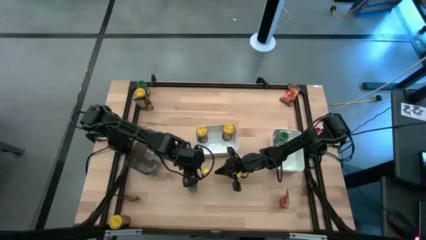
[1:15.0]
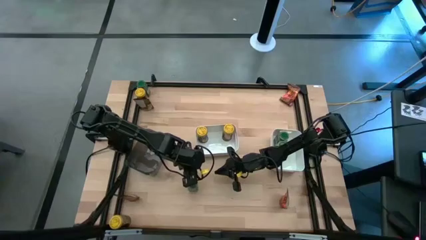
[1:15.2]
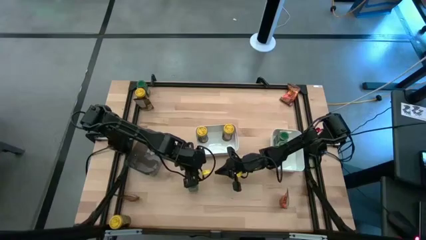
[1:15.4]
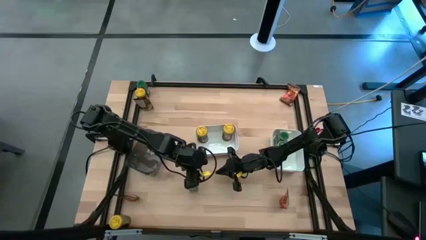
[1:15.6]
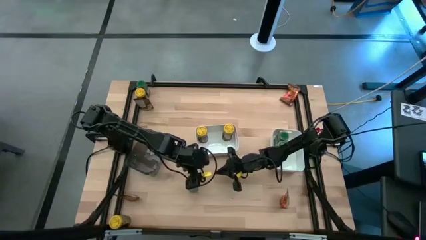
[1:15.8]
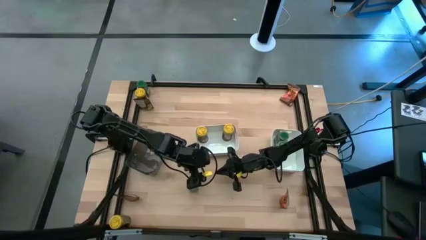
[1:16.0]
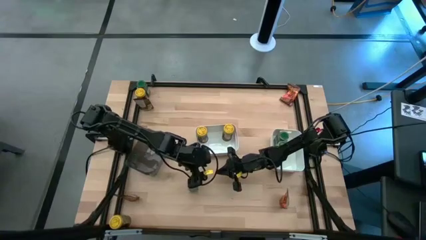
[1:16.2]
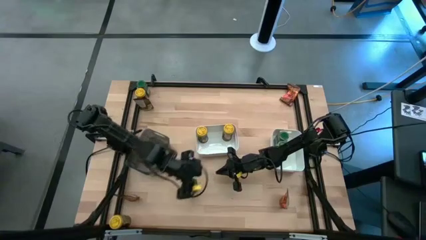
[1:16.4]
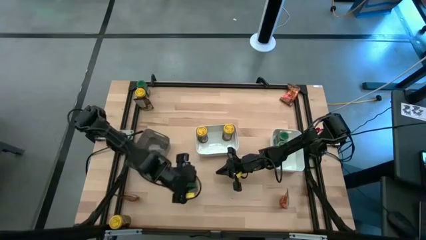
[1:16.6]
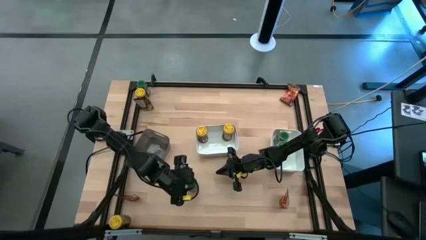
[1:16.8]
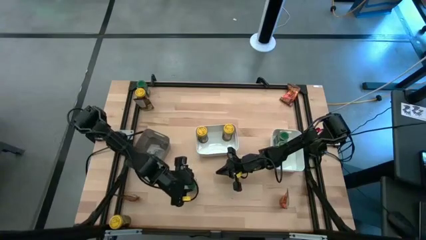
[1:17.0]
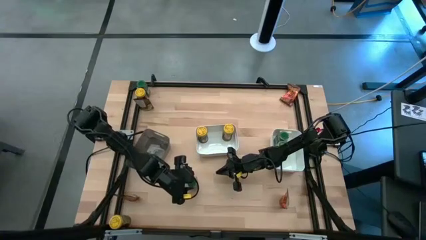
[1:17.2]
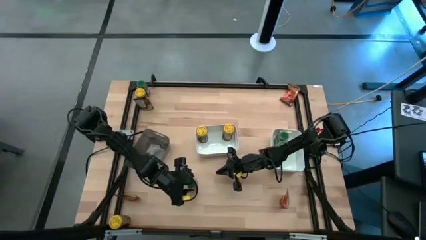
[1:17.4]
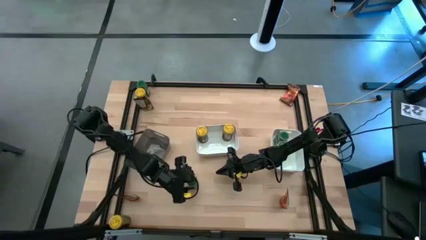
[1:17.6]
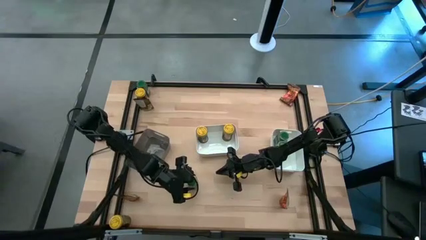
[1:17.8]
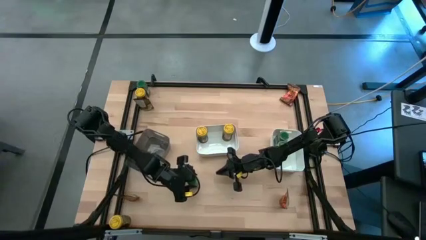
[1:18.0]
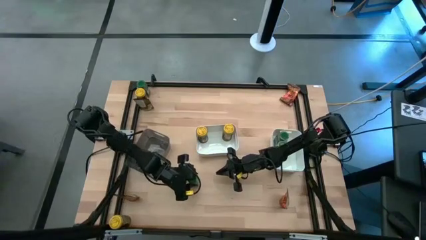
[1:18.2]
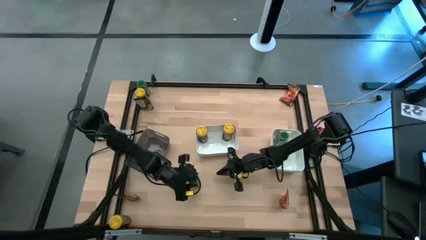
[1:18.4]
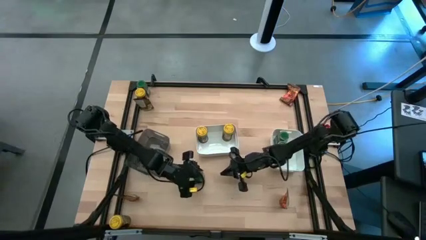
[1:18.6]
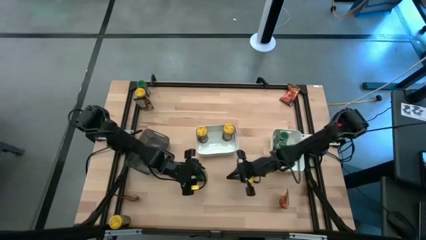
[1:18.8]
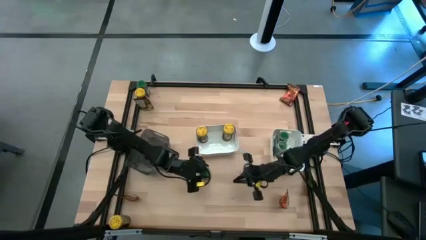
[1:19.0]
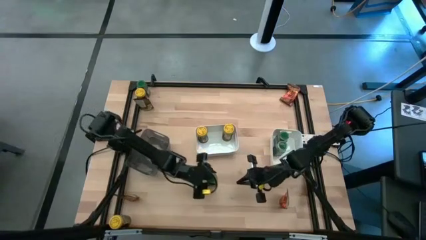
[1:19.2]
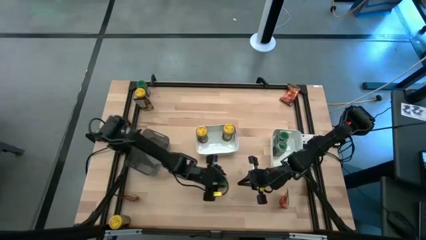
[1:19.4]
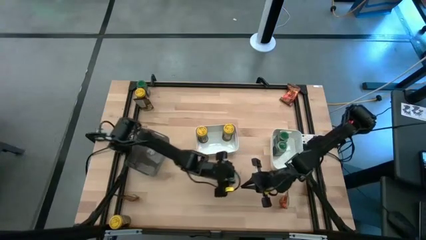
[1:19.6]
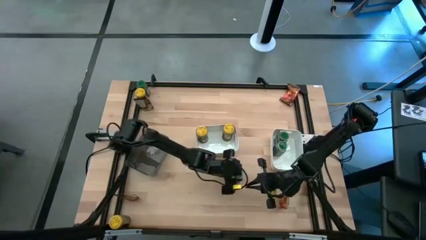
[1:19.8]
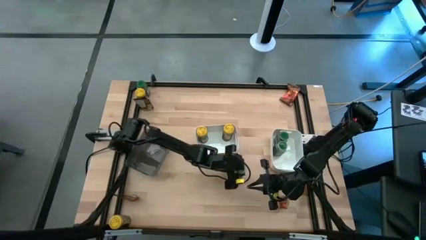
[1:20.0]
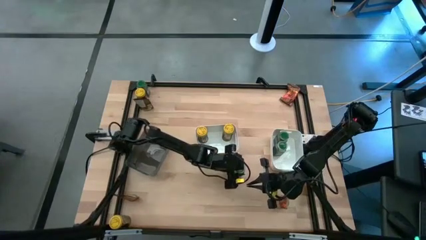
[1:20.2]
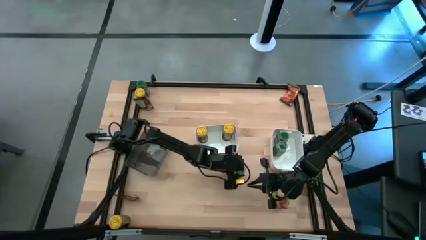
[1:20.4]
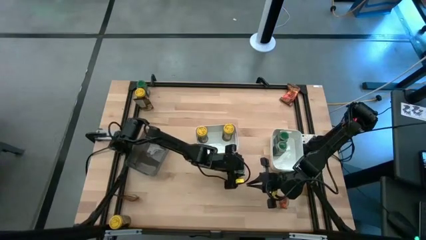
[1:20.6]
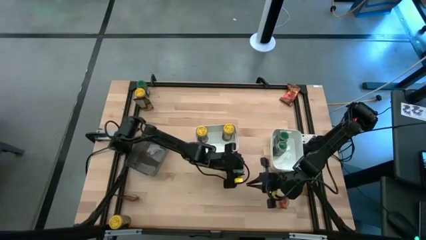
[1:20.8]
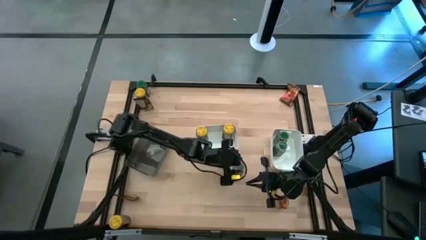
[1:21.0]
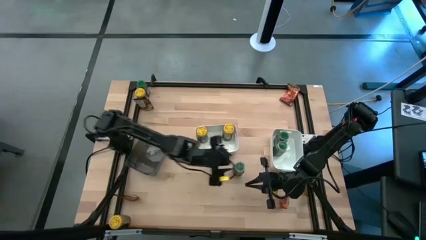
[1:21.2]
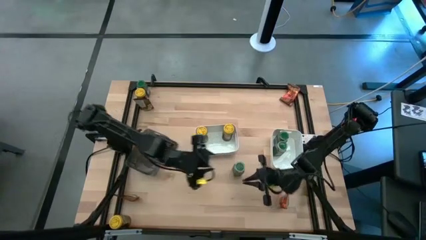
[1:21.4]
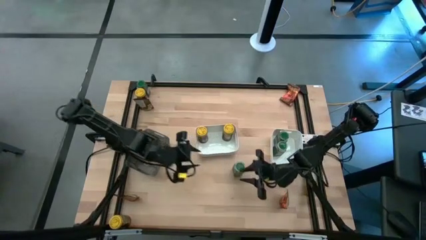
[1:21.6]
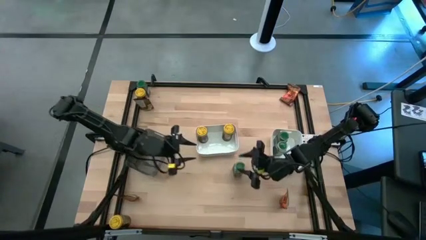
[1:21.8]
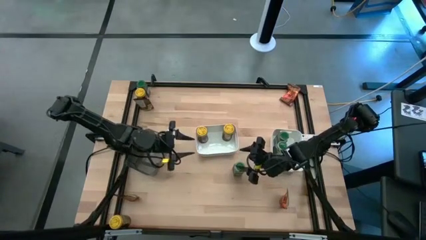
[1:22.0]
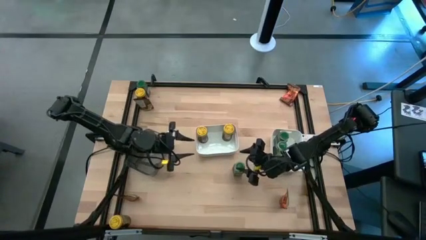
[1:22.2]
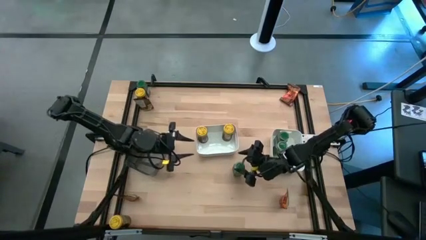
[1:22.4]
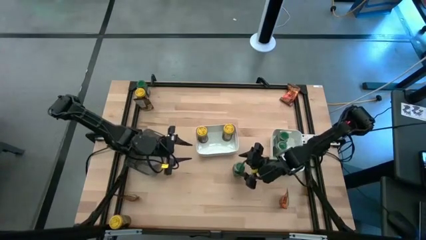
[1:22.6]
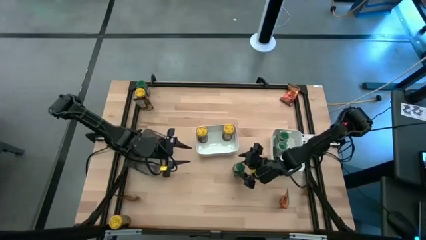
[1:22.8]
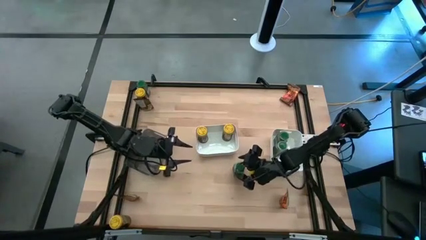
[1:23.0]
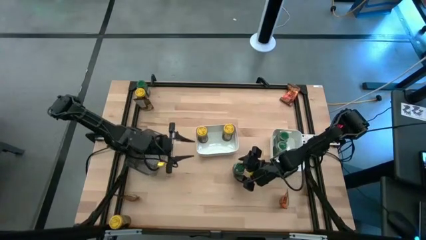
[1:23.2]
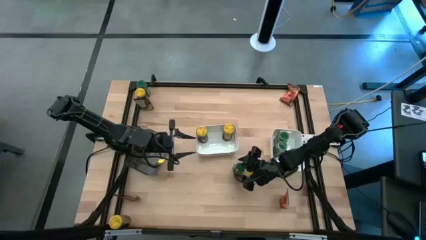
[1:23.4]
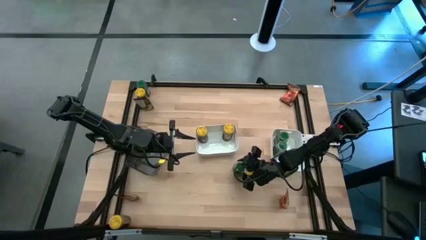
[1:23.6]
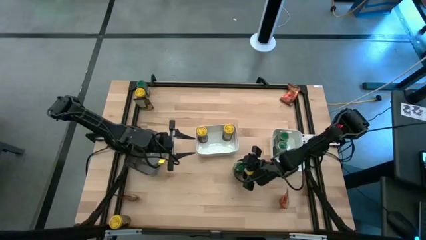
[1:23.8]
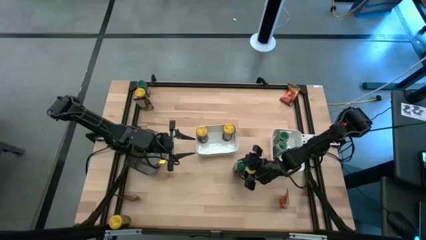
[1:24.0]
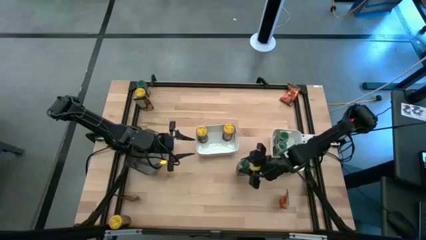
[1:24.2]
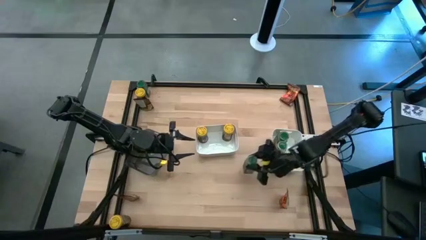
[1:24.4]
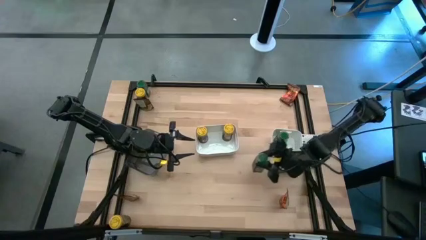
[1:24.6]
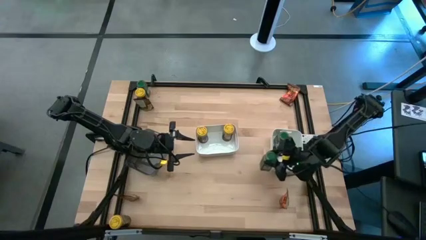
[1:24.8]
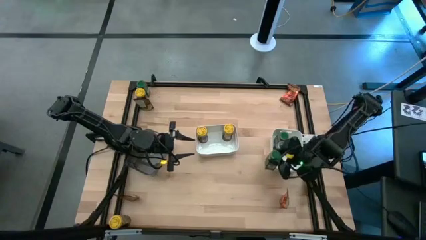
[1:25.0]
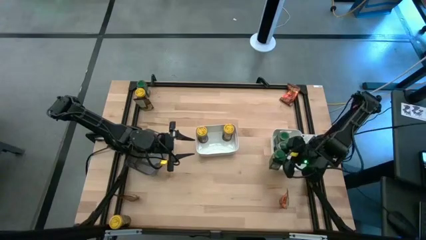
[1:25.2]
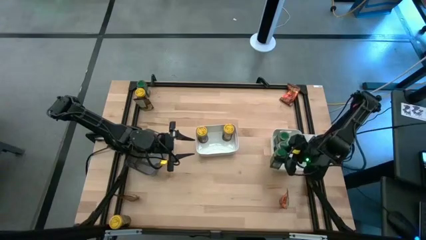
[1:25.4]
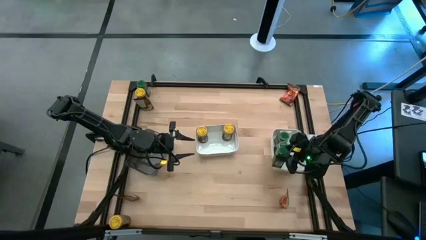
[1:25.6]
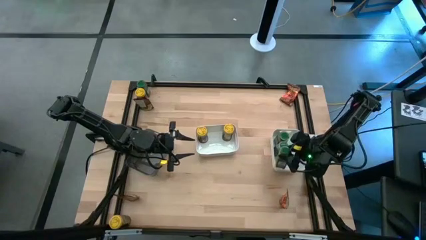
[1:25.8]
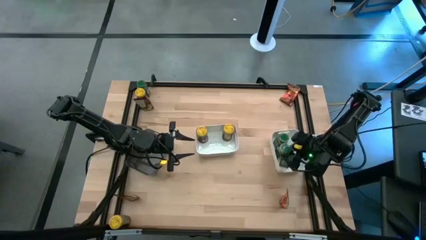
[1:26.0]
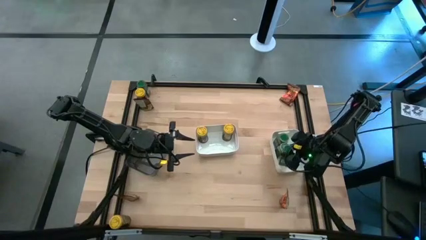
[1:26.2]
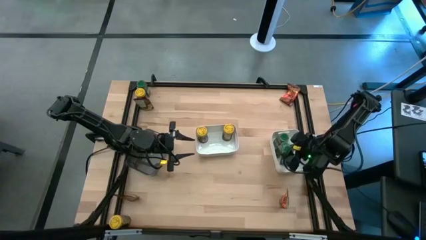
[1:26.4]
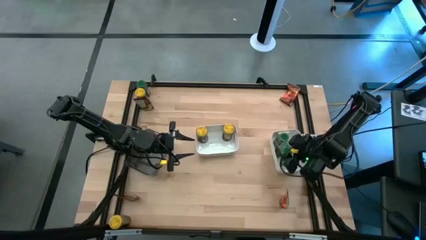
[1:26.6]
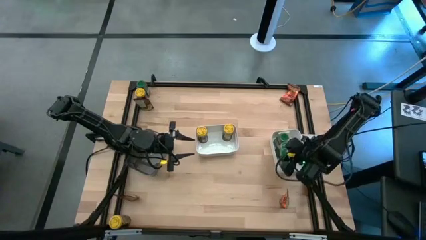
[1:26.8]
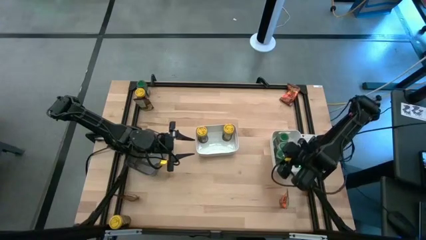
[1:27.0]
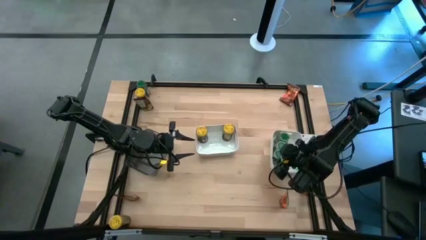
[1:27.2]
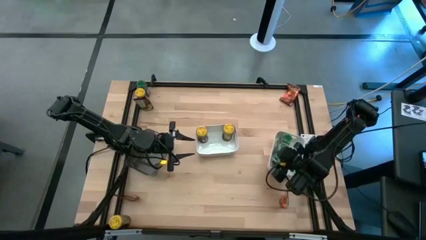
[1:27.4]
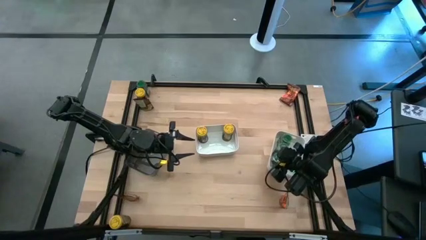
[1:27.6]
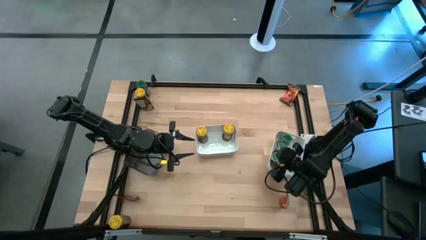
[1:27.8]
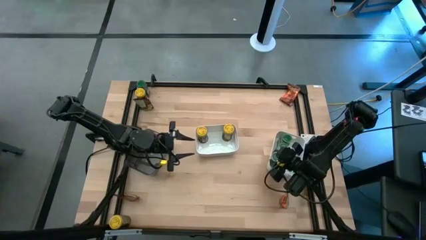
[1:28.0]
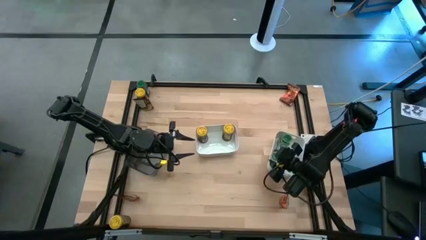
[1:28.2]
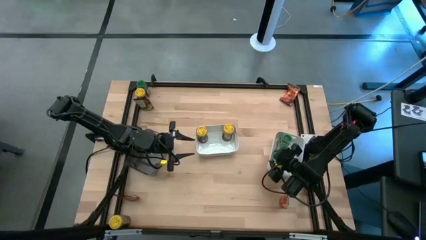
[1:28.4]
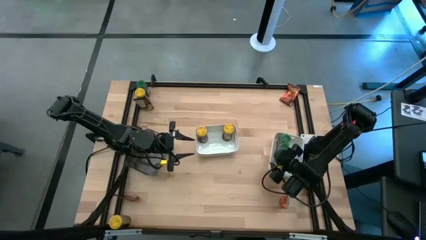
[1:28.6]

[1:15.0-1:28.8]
Task: Sort spices by type
Put the bottom green seasoning bottle into the right white bin

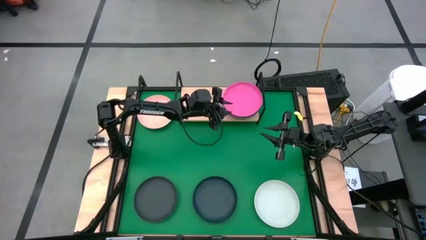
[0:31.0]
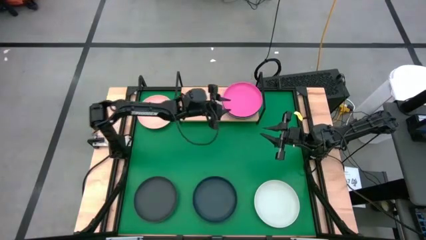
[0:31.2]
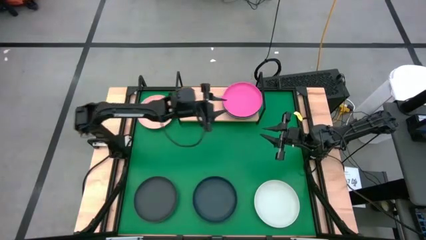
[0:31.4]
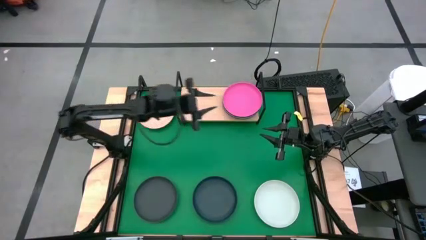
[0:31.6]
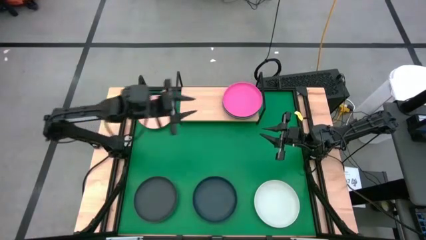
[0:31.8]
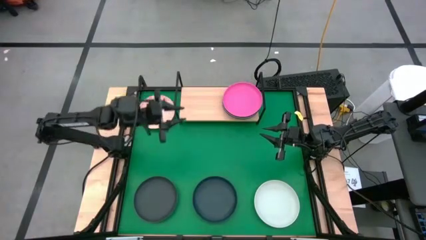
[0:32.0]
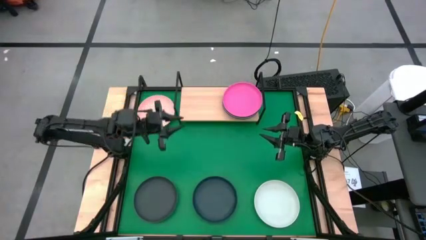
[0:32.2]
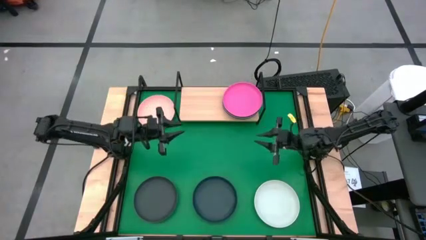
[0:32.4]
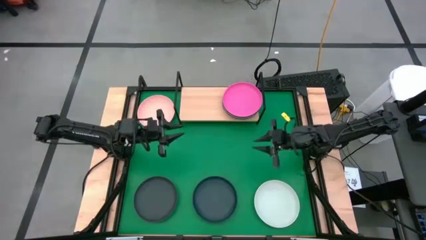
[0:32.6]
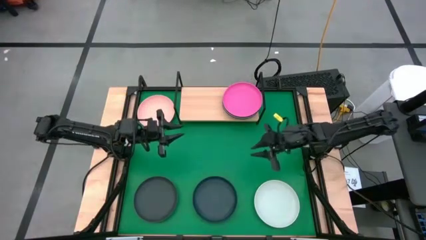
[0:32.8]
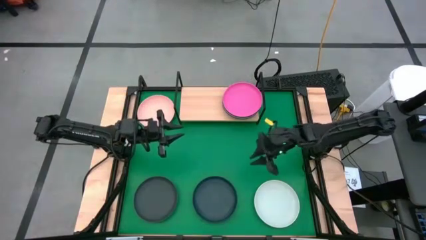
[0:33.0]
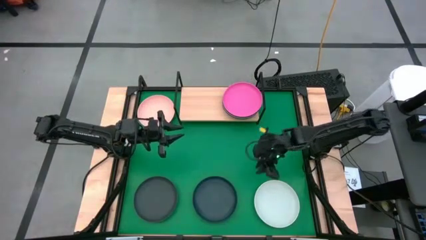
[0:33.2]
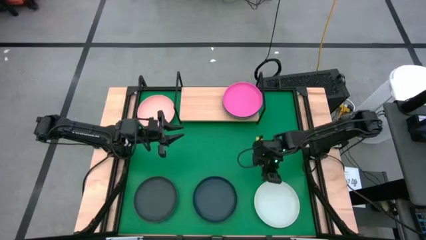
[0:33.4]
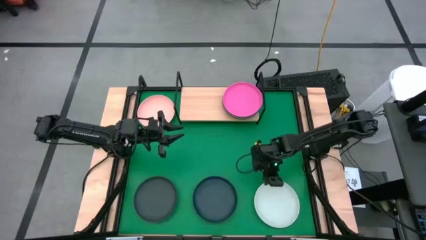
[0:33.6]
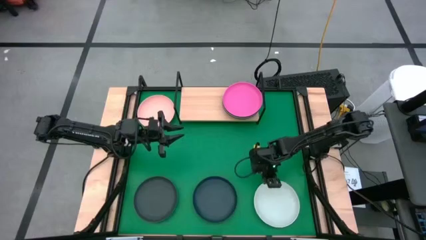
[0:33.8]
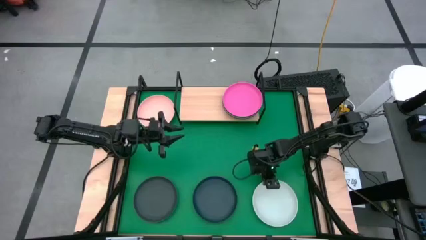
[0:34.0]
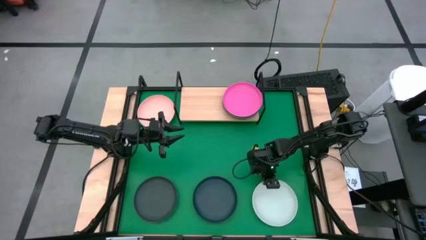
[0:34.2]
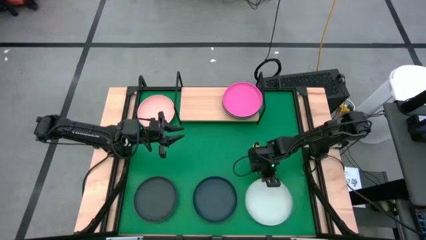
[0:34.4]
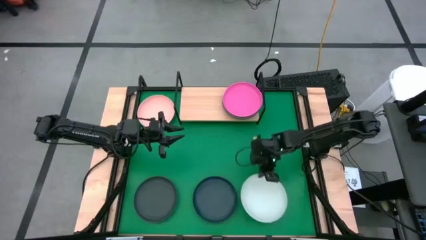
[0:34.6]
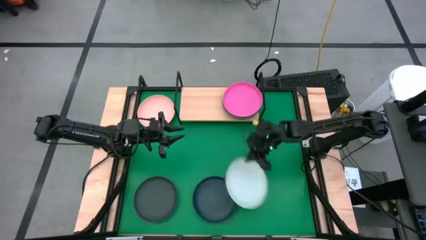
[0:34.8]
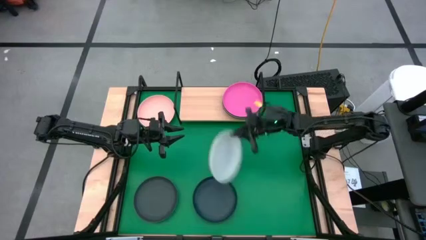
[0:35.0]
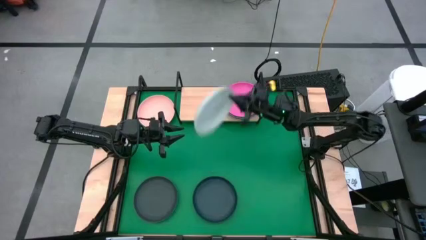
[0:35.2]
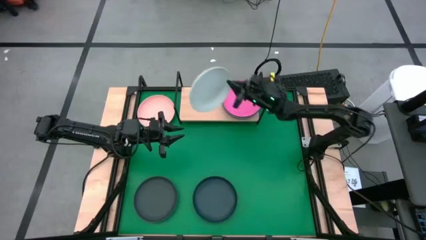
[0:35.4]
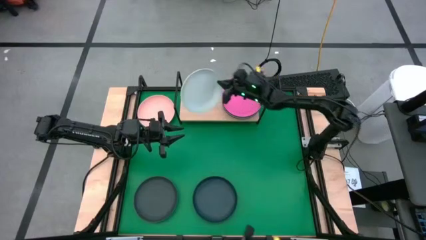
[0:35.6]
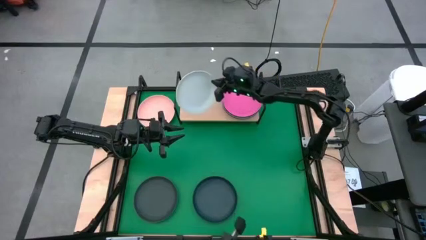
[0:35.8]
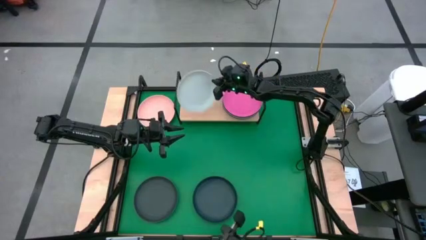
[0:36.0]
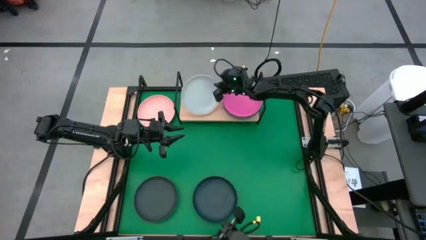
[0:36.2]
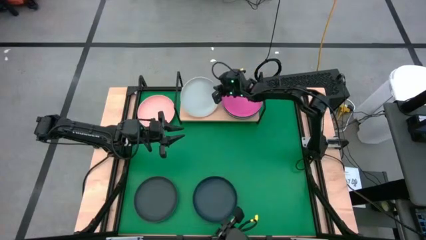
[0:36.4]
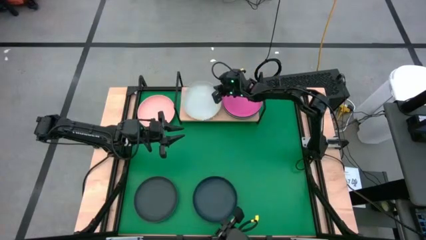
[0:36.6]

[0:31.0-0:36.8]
Task: Place and stack plates onto a shelf
Put the white plate on the shelf
